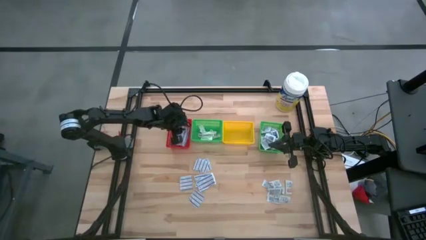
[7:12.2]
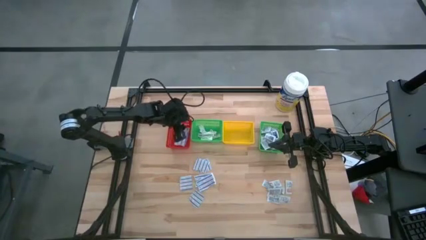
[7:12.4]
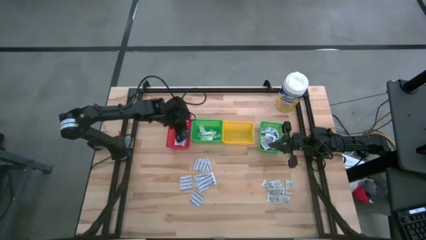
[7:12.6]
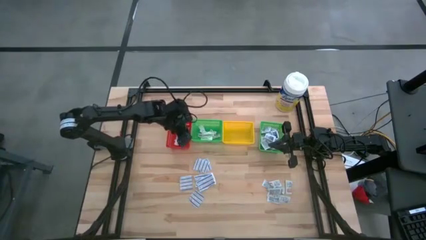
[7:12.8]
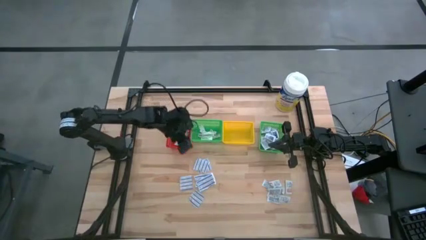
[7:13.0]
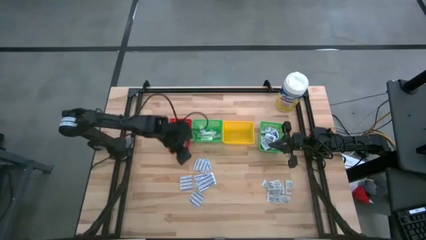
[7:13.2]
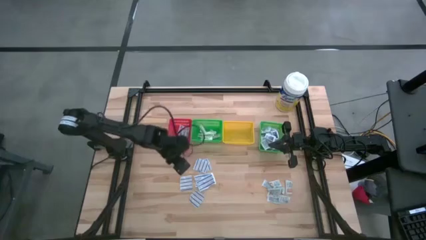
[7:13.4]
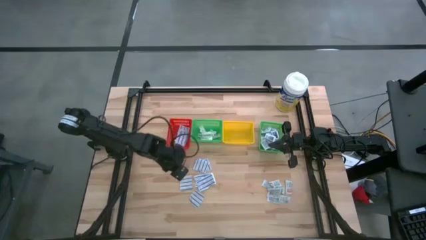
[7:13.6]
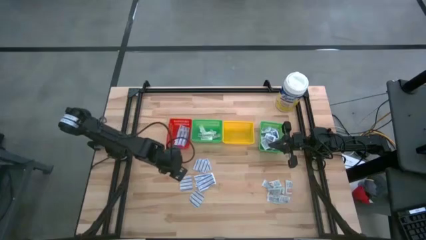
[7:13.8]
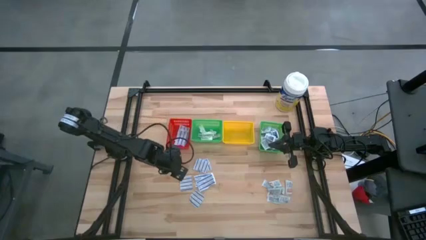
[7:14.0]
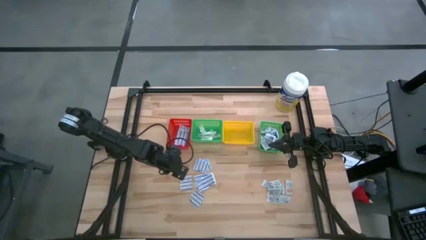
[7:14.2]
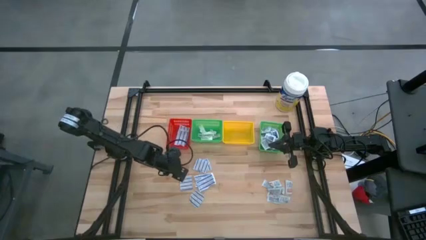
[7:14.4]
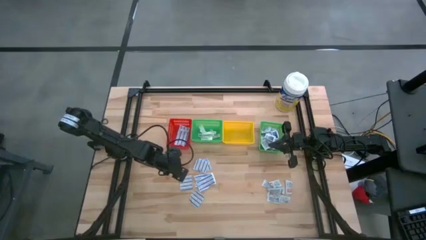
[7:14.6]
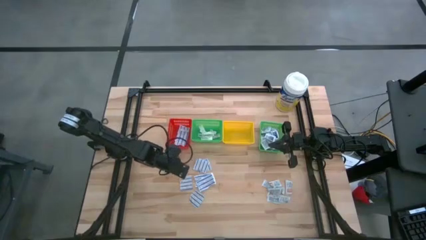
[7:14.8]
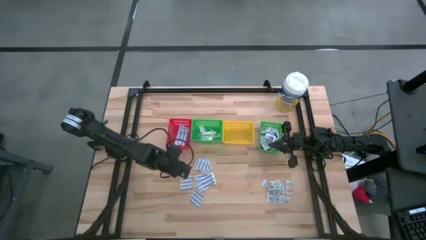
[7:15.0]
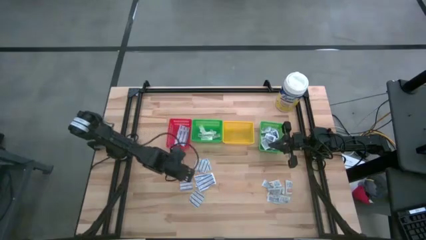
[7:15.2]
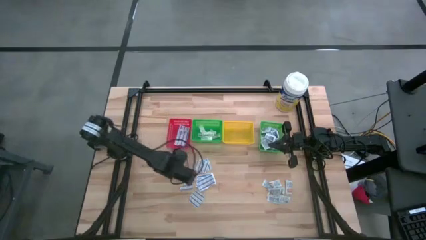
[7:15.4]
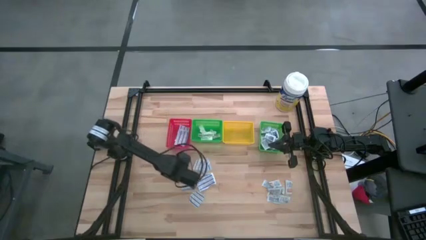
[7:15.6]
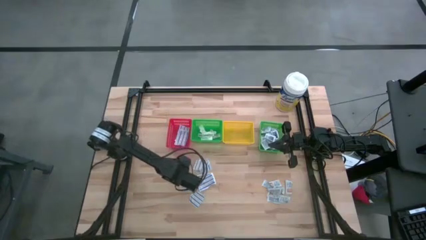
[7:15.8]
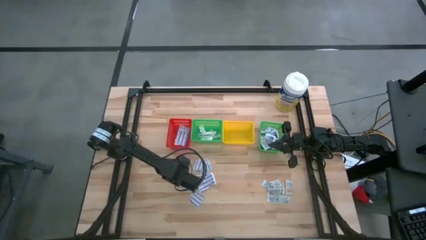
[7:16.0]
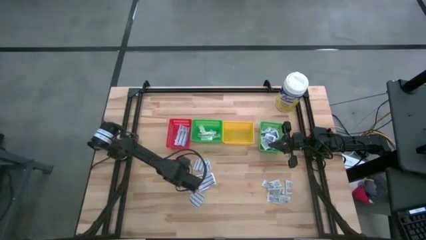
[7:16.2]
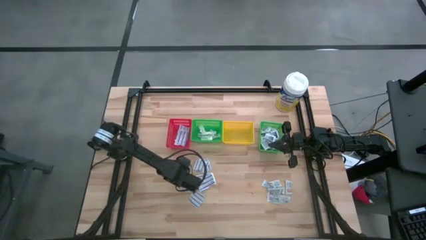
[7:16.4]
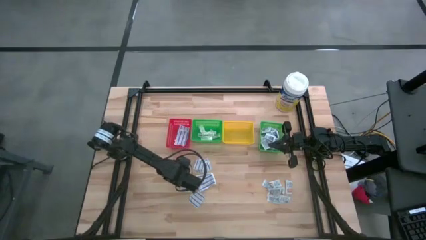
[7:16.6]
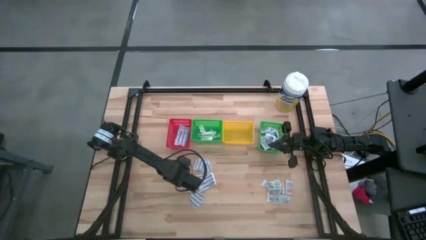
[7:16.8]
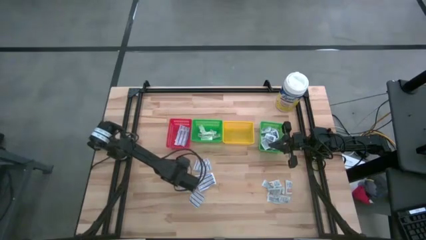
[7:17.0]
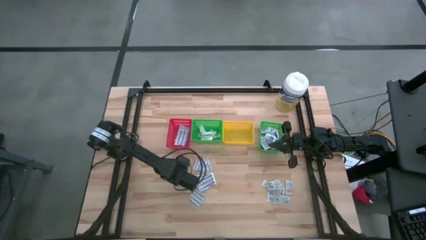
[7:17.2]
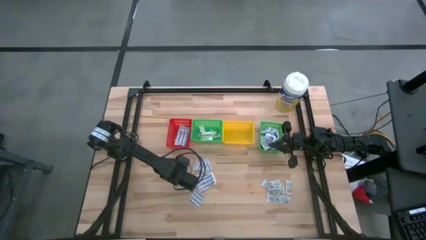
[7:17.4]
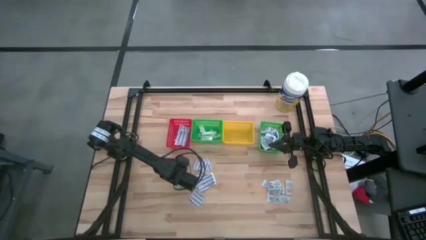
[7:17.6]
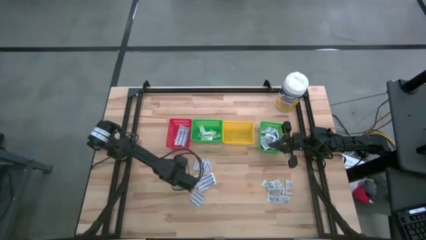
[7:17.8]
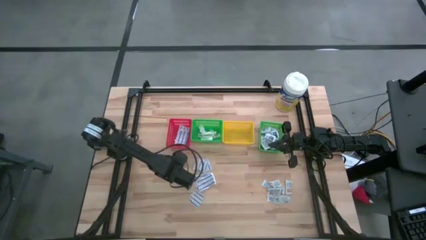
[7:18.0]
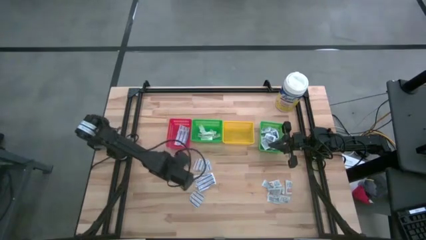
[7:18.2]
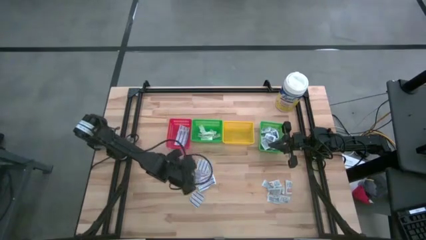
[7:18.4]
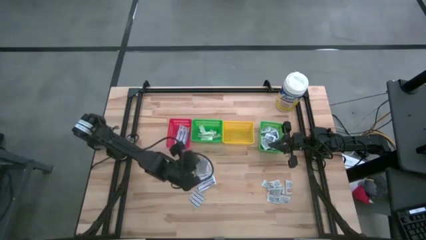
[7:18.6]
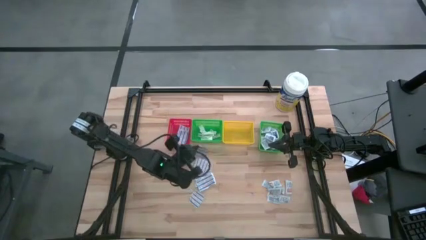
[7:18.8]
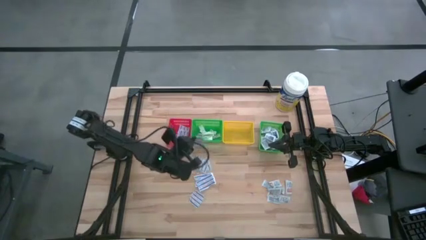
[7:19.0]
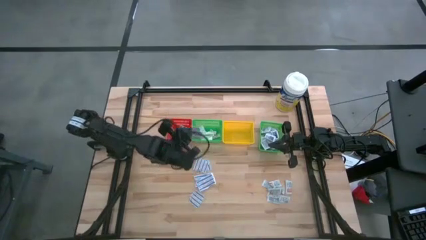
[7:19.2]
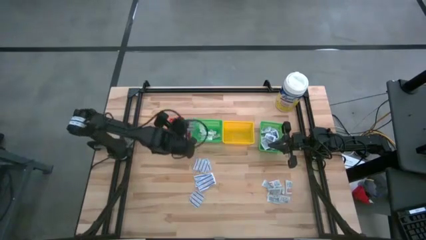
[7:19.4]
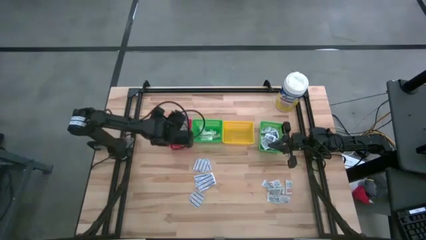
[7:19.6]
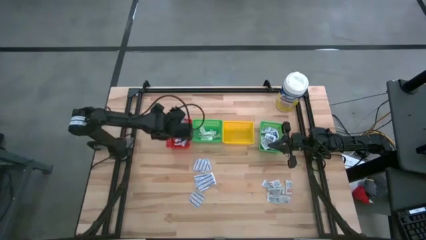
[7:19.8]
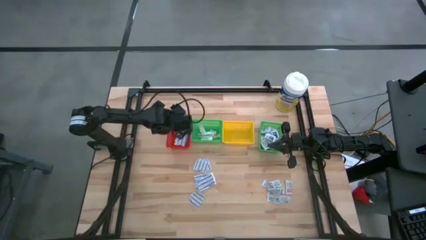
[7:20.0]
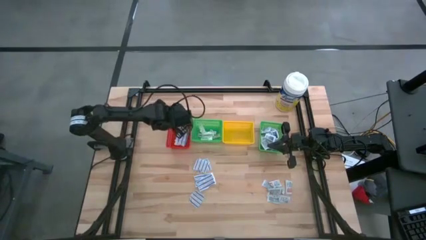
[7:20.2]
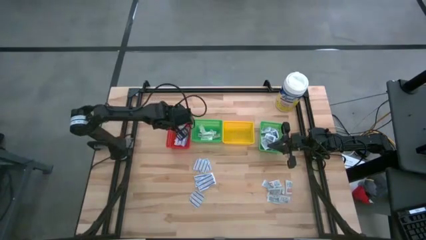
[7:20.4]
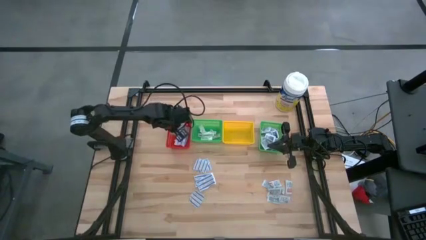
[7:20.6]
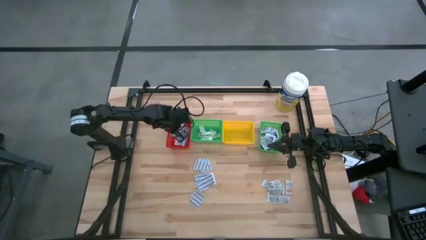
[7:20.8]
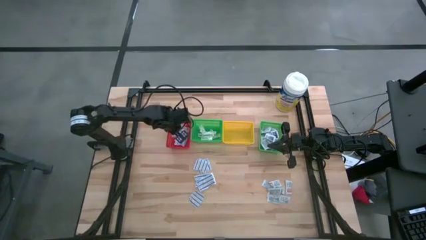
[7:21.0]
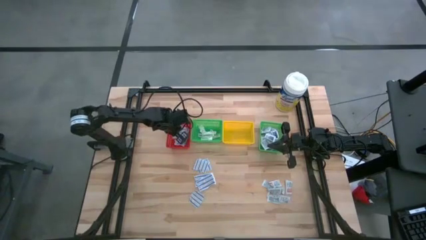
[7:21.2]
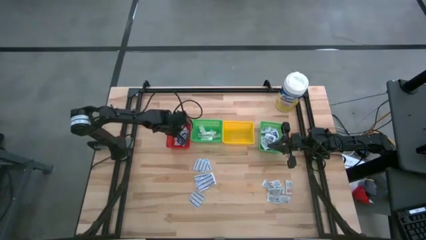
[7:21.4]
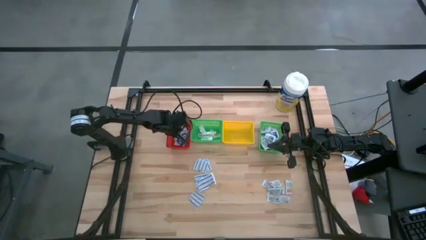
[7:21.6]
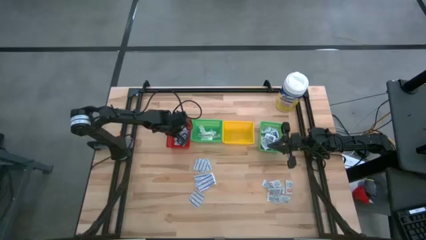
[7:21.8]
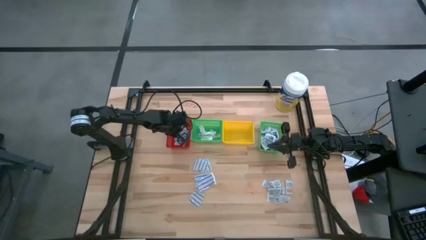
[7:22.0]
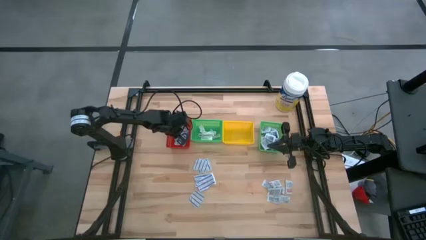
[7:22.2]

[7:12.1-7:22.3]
Task: Pick & Place First Aid Supplies
Put the blue bandage into the red bin

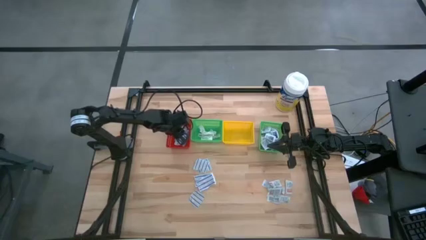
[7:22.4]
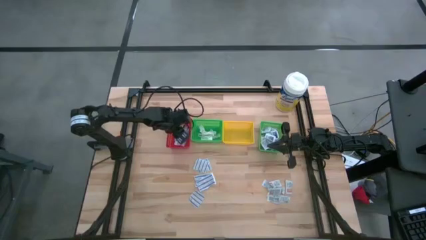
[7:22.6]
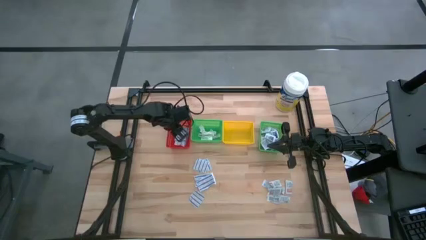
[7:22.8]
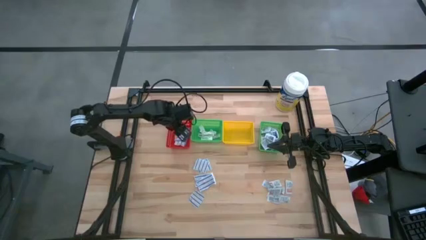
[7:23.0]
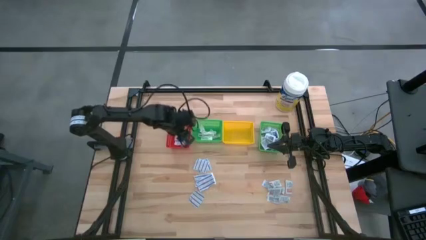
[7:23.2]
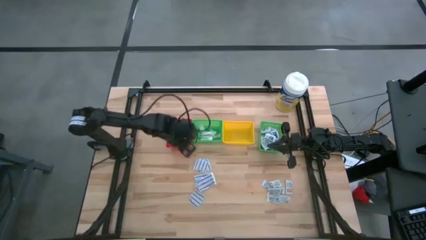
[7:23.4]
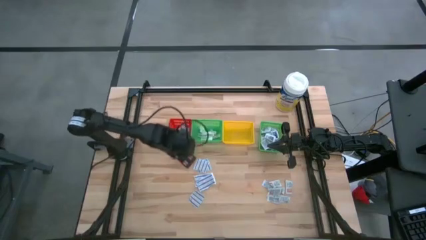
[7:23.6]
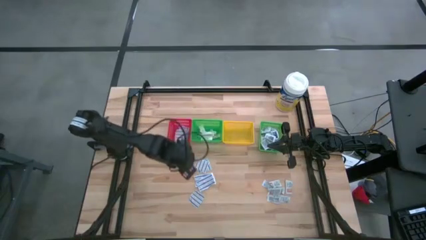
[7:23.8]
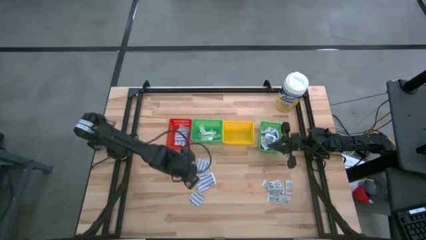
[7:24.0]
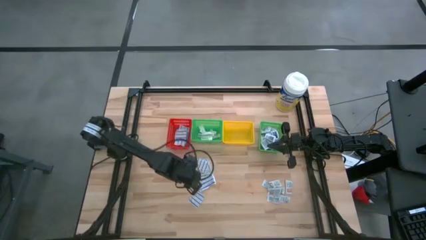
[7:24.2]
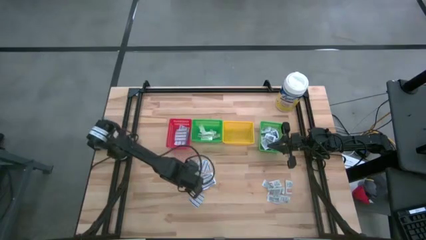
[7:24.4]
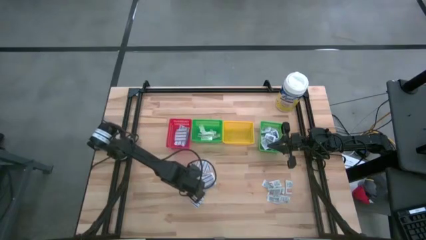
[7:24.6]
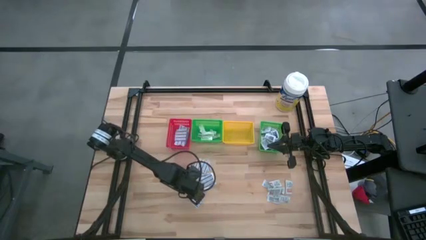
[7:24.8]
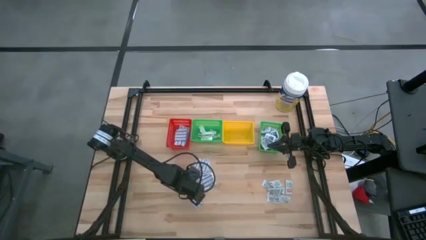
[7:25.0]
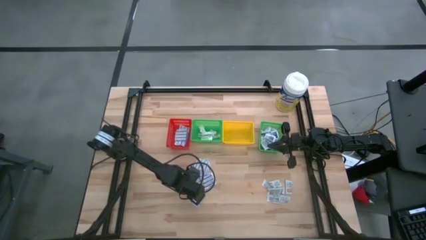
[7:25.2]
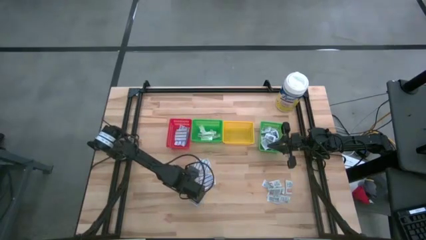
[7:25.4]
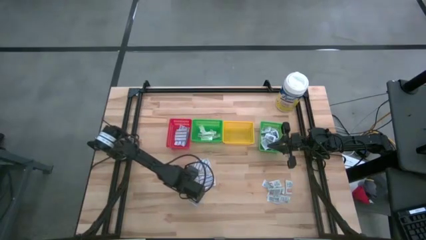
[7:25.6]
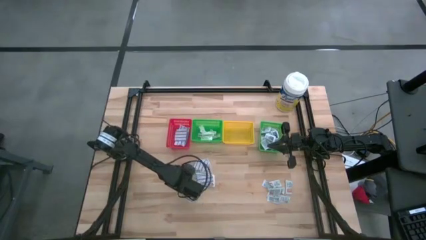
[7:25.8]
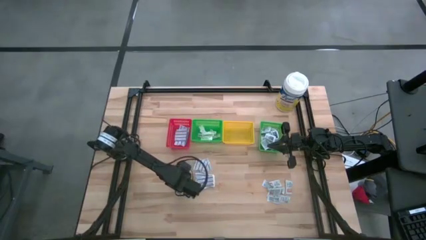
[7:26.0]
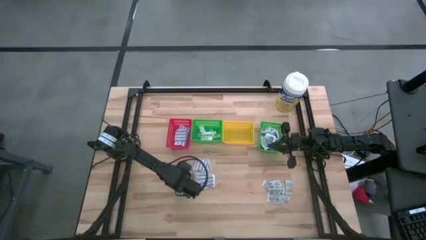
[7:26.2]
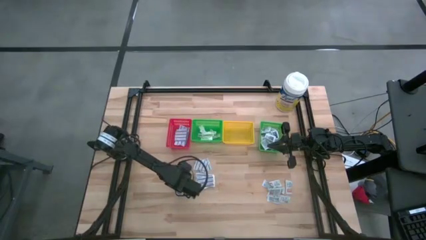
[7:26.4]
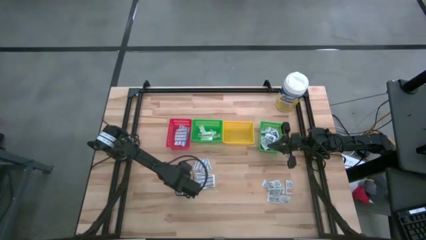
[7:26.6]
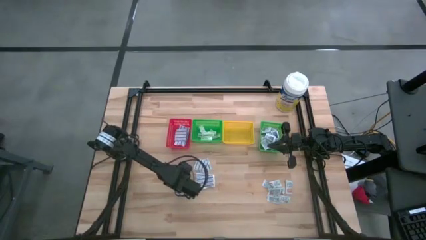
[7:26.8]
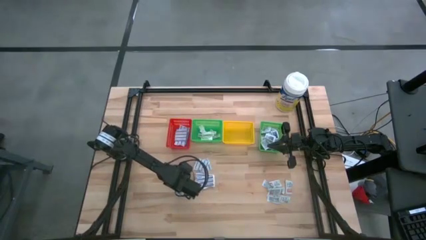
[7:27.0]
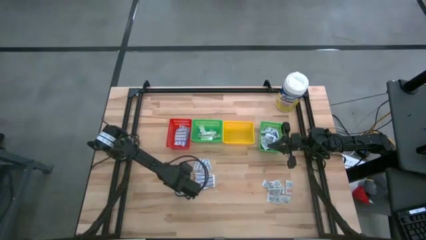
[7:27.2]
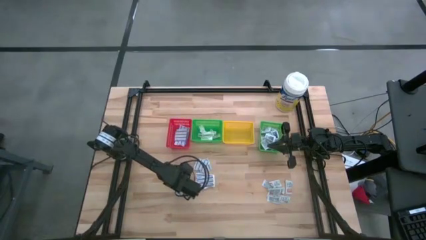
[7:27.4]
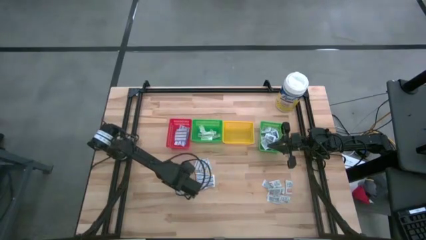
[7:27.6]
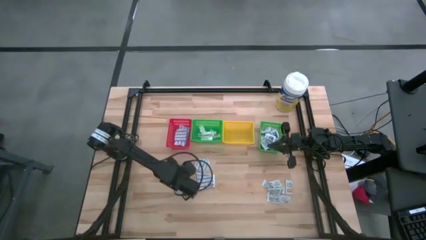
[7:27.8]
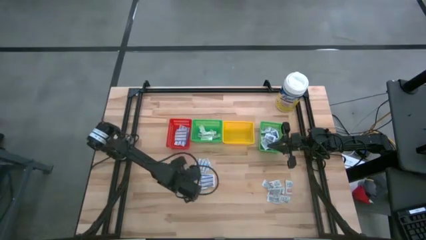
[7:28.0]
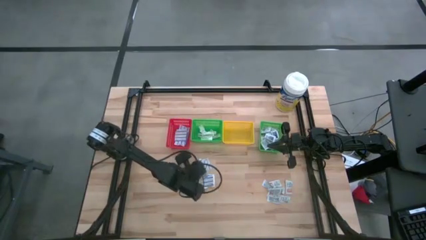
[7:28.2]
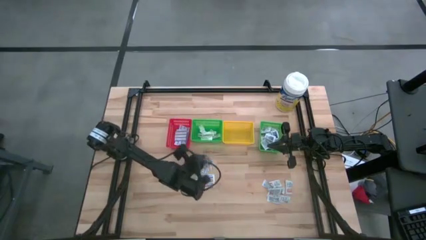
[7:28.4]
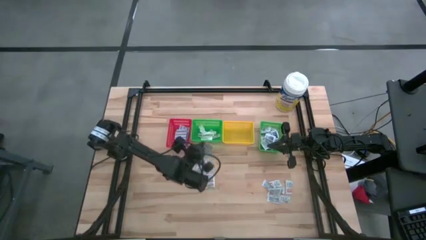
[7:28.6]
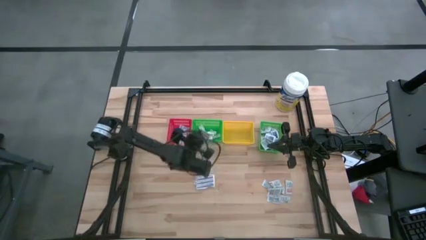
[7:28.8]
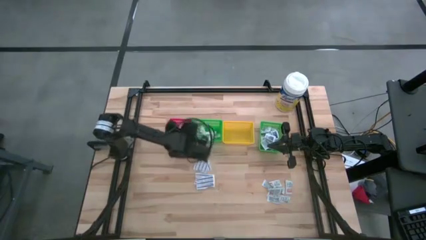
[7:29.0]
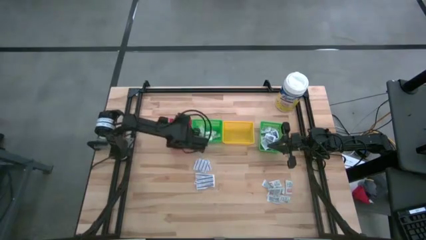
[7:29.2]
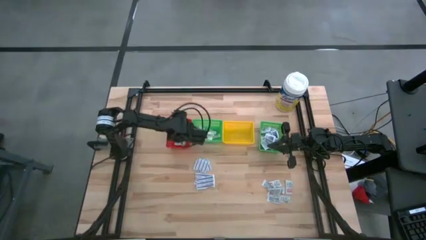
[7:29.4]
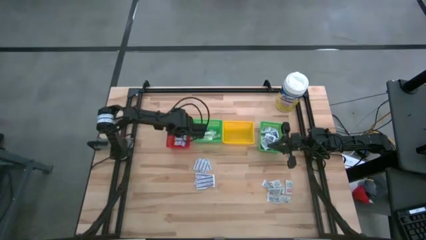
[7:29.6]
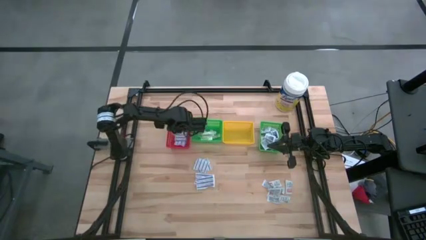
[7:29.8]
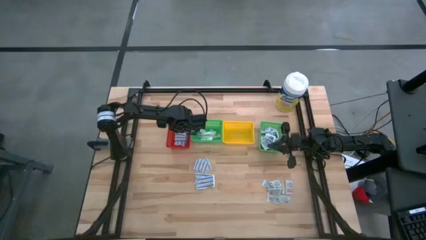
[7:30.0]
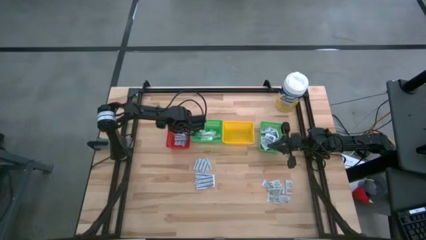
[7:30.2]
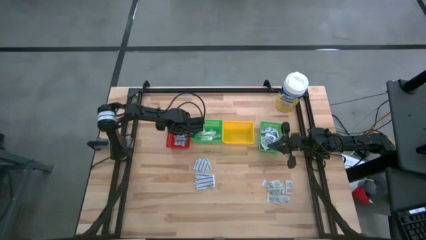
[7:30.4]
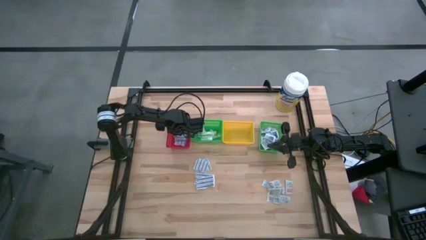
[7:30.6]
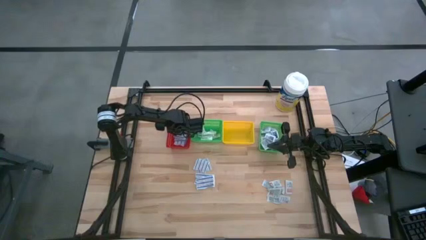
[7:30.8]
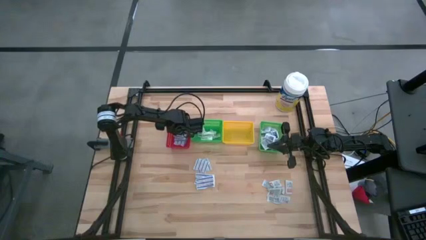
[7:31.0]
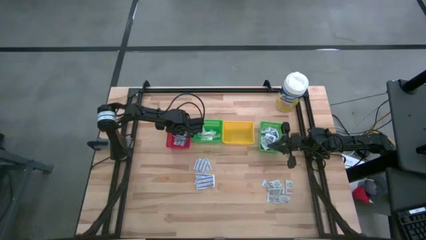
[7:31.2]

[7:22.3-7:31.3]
Put the blue bandage into the red bin
